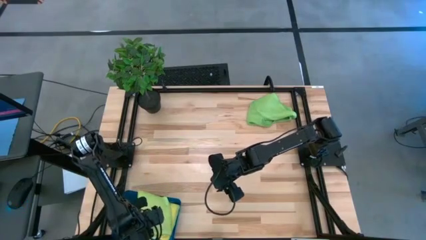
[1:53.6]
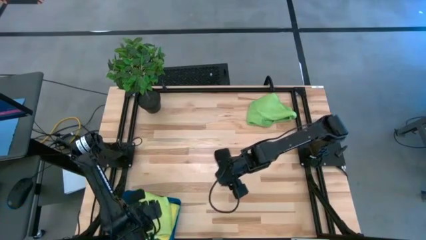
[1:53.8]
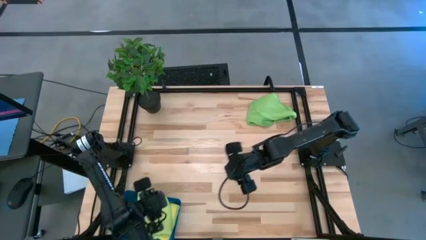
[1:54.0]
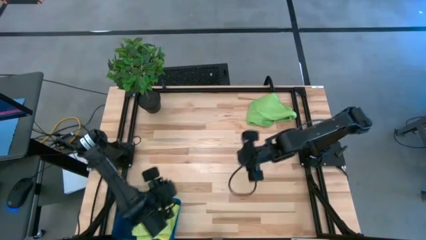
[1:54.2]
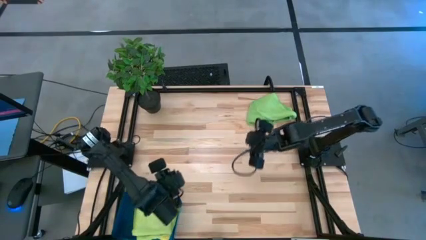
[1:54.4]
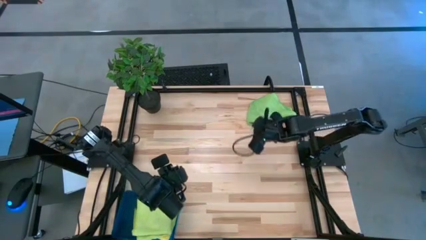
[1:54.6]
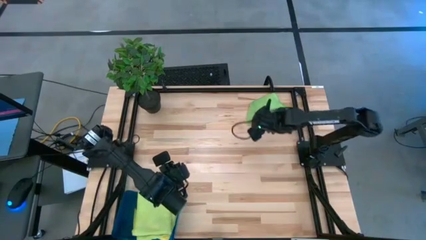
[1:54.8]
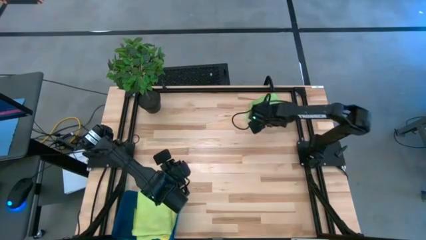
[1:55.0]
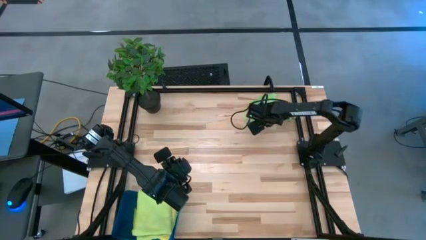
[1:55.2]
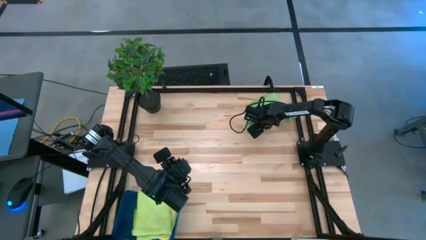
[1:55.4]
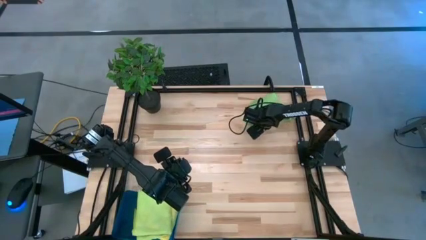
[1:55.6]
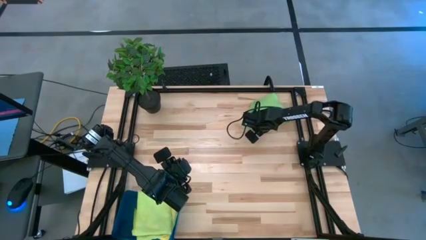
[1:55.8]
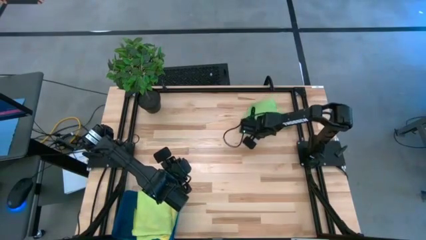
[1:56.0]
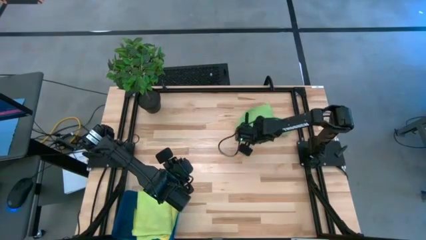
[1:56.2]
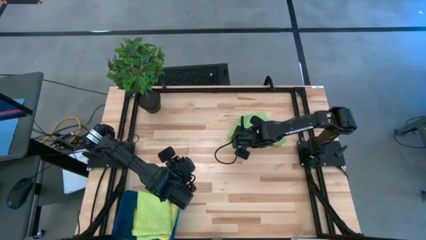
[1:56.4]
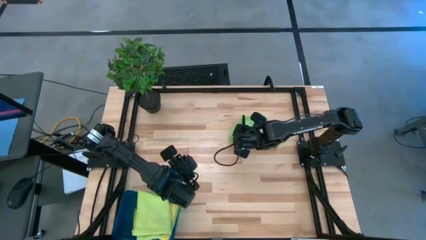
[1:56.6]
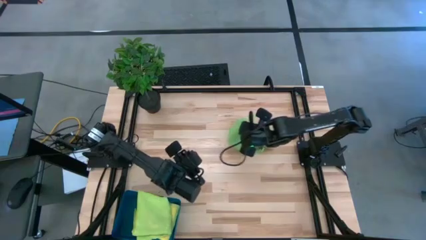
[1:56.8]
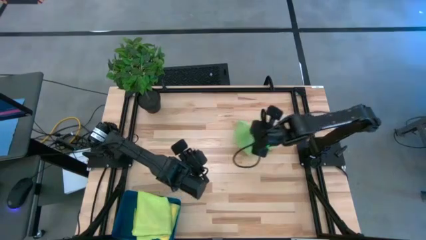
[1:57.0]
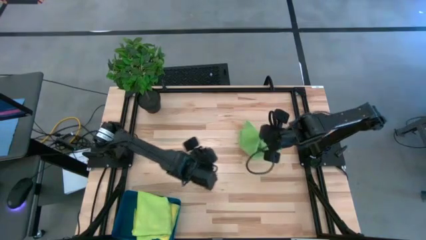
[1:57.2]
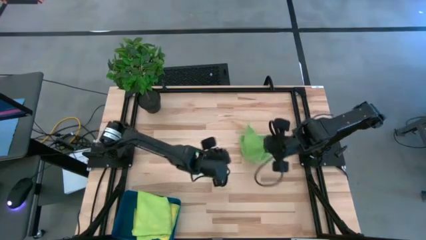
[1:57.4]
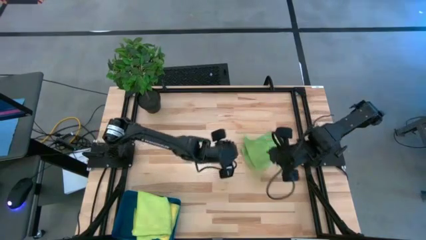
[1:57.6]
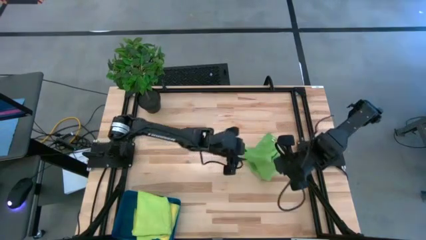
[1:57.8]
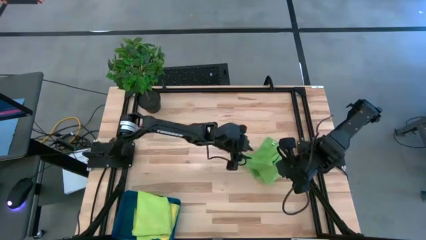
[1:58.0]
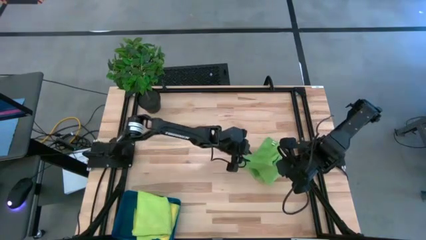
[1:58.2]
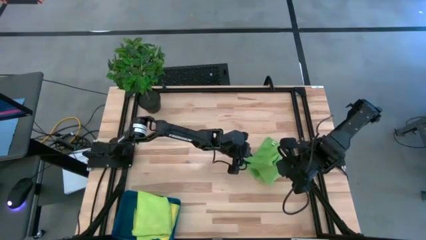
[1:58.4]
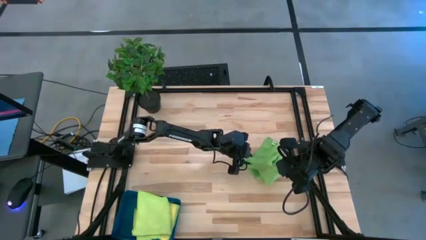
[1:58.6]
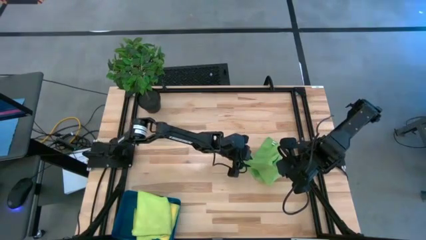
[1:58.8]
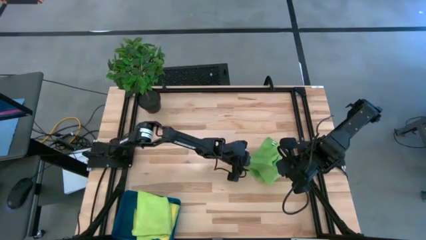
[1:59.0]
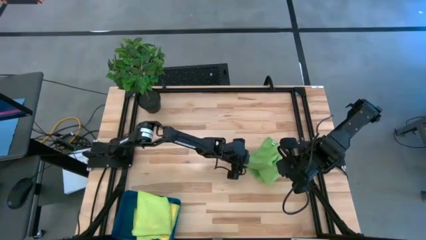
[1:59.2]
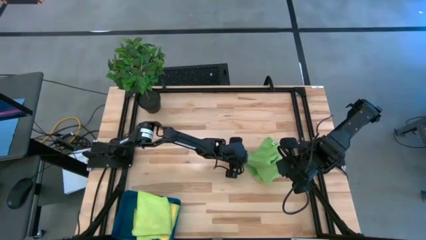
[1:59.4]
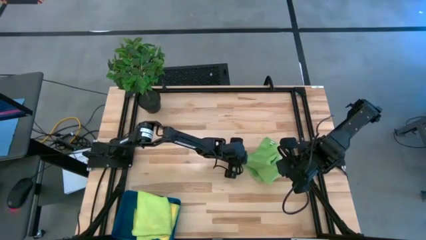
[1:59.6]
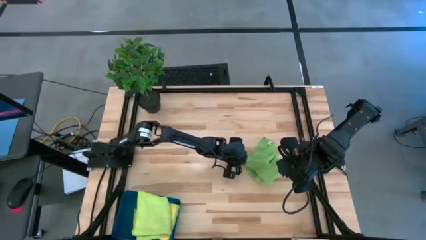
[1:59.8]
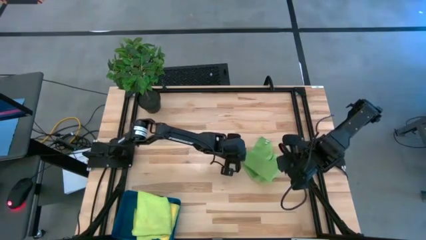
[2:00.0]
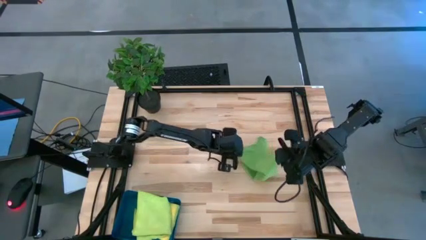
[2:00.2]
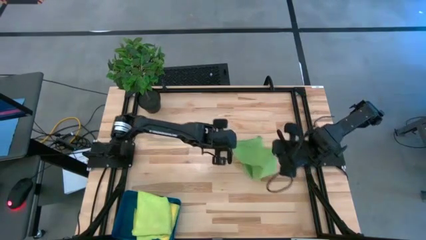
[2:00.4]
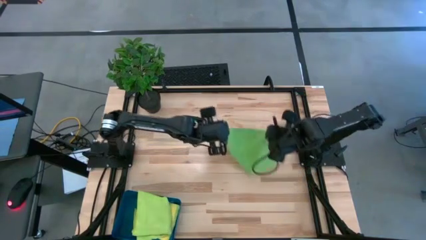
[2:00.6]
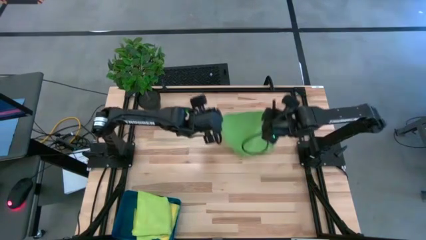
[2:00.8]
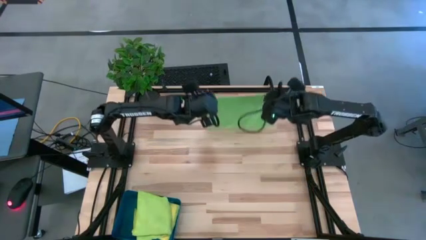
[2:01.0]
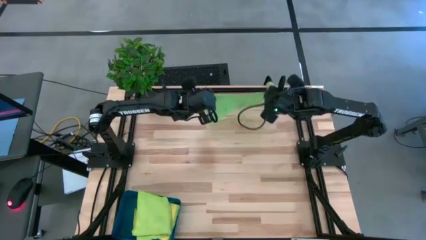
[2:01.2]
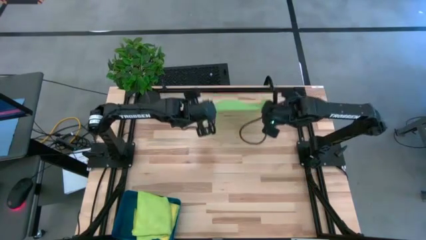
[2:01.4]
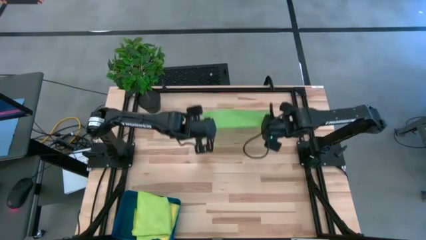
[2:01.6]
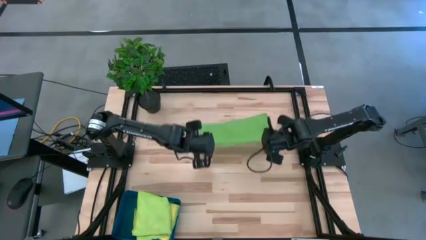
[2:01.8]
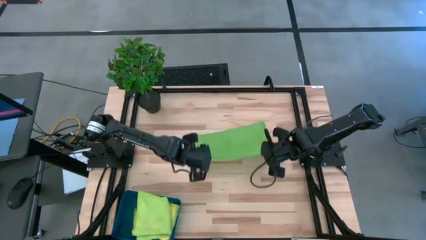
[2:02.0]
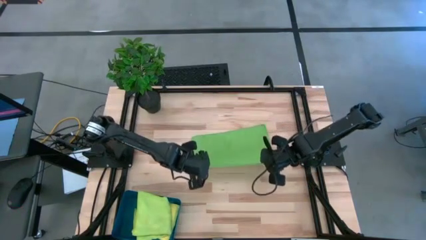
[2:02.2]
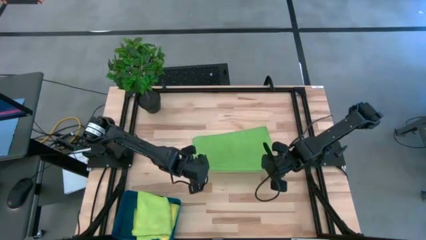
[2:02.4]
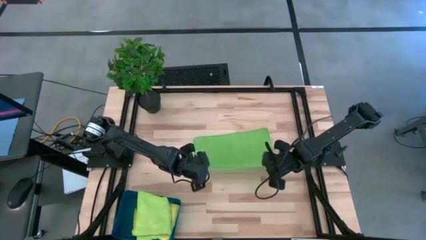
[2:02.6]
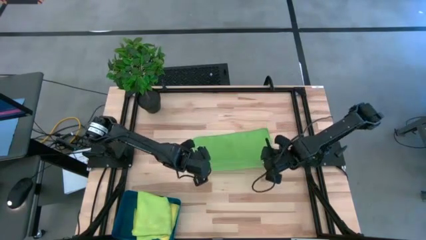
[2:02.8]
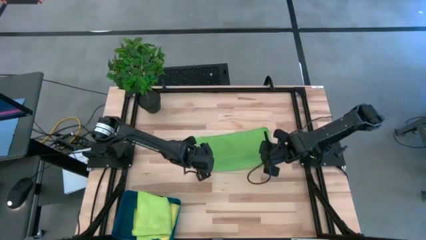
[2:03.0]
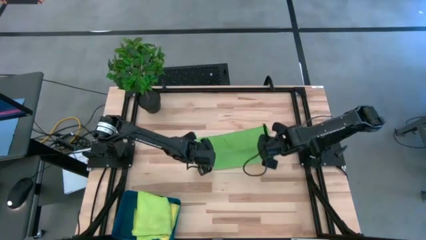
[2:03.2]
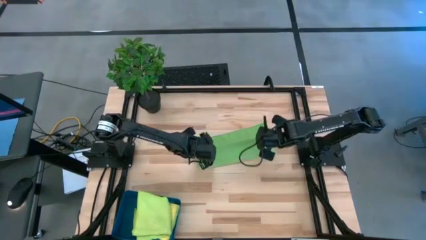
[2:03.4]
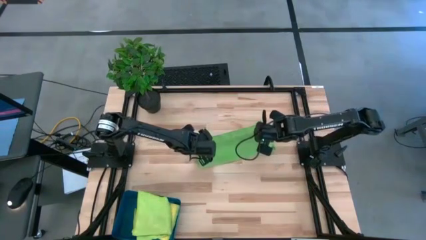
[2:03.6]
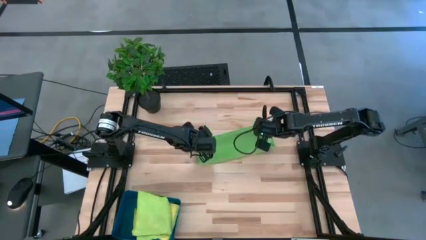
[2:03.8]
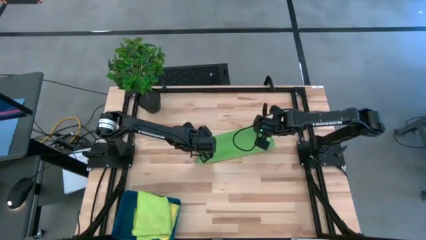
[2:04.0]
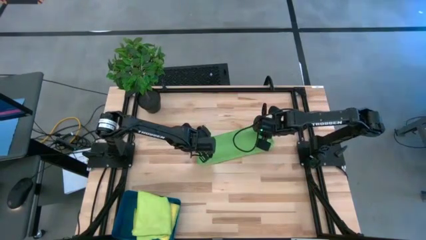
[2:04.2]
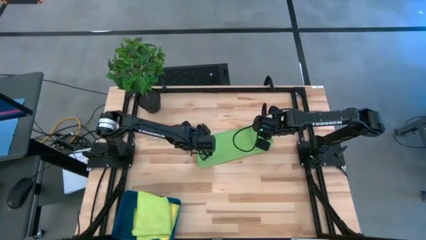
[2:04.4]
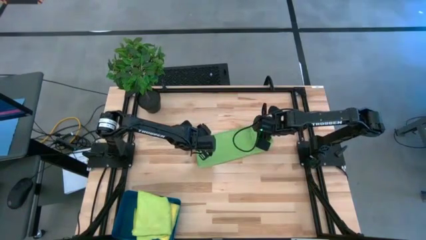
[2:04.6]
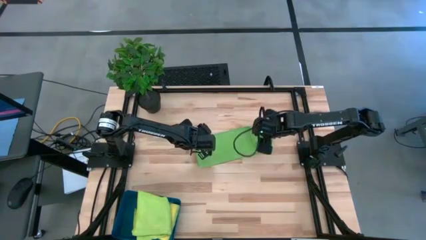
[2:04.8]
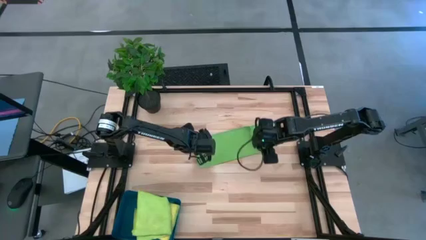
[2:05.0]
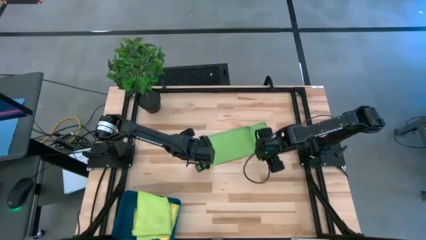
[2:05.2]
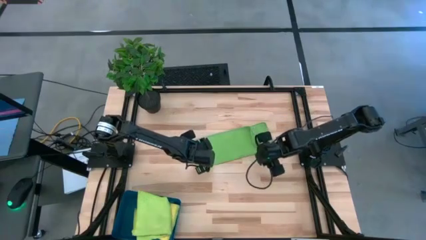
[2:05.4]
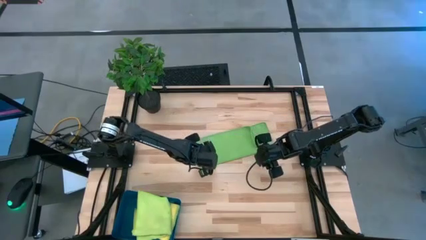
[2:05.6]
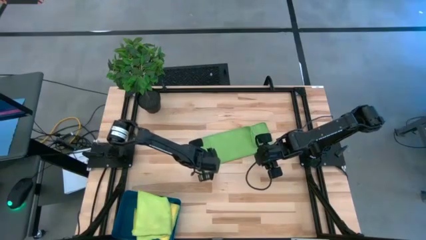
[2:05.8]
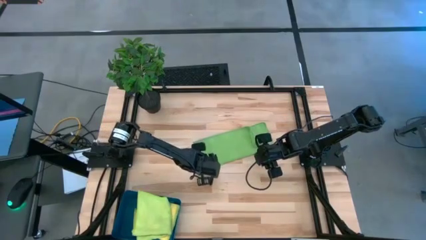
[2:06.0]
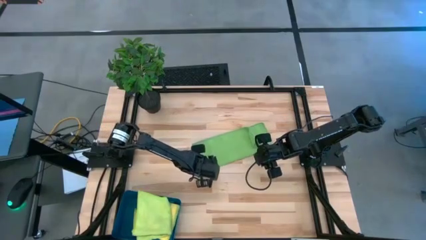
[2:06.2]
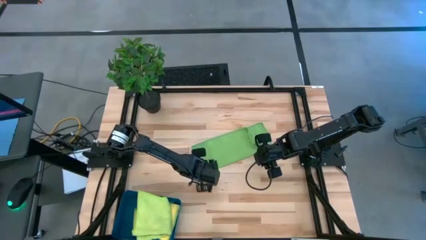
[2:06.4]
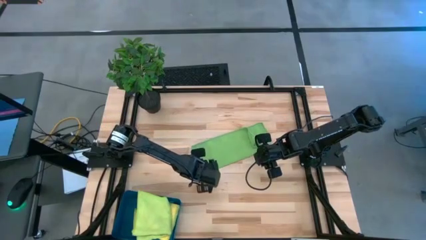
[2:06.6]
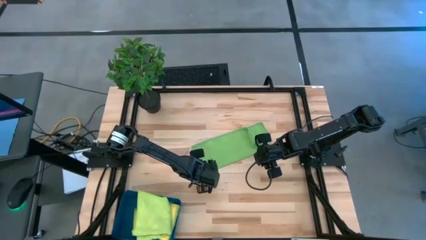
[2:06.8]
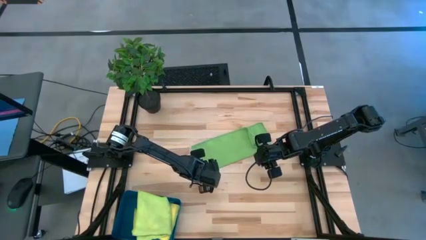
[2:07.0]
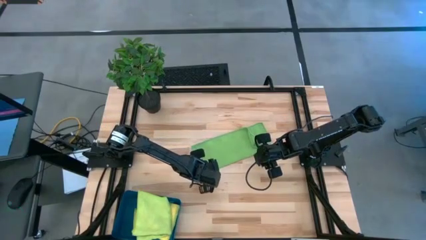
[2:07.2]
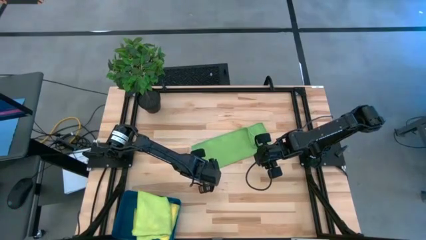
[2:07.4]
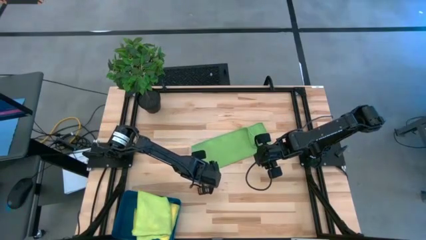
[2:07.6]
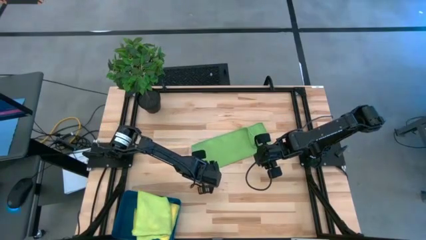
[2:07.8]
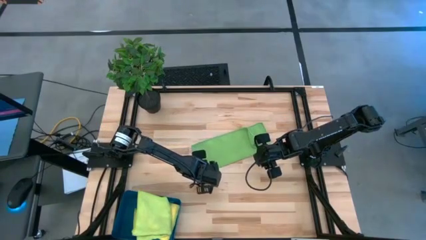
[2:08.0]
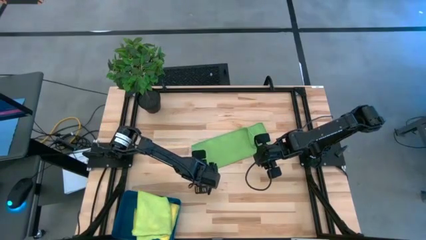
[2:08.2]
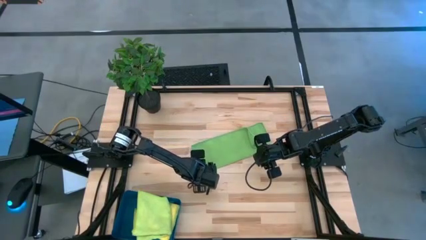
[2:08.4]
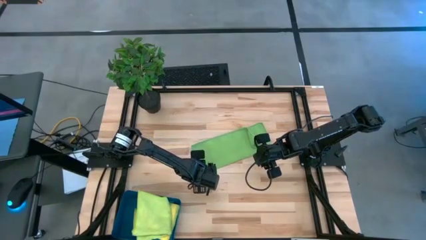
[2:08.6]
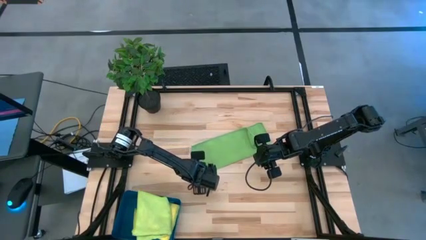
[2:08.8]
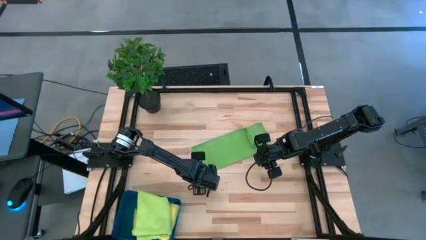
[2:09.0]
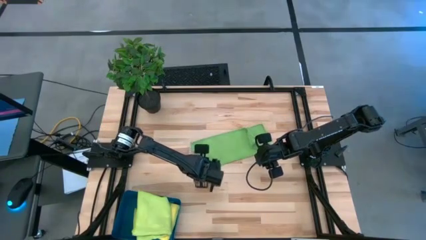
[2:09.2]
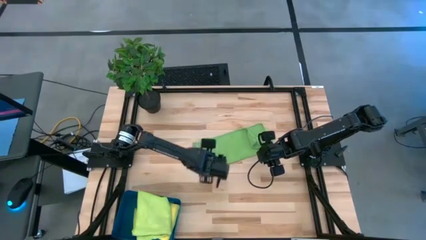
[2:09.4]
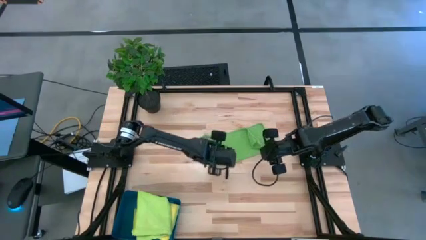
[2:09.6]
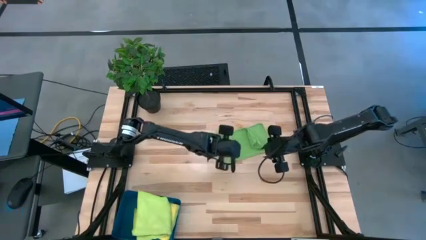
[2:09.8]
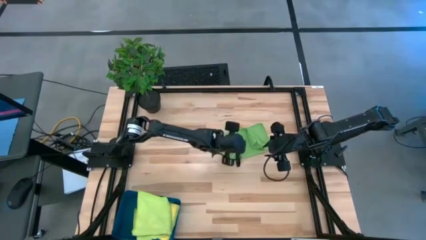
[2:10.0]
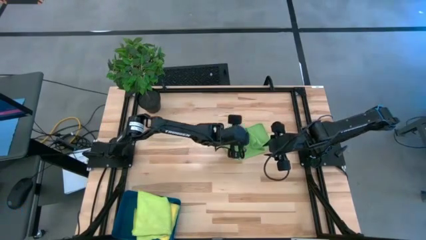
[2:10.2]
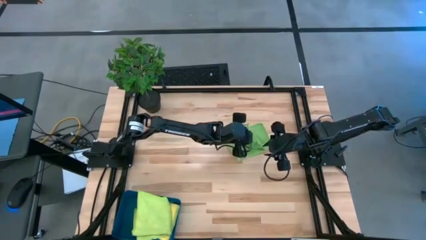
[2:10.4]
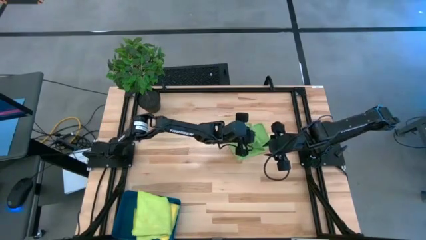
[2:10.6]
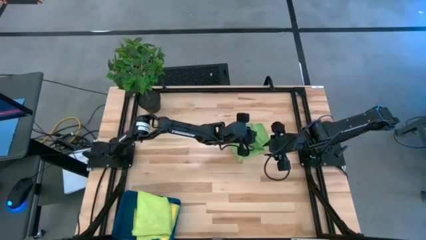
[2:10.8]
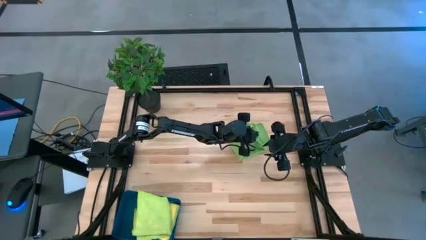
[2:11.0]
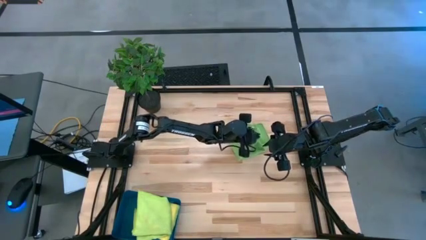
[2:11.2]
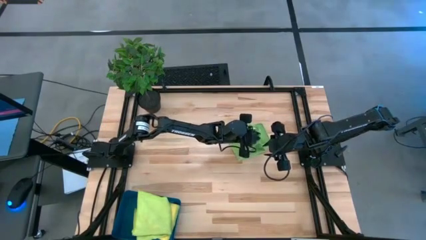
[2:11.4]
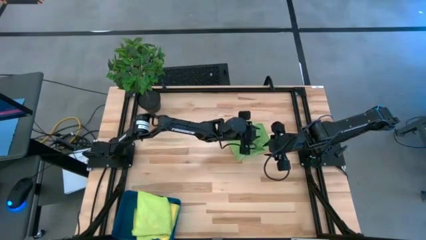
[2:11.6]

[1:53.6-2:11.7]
Task: Fold microfiber towels
Fold the green microfiber towel
